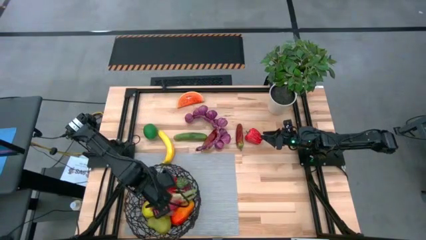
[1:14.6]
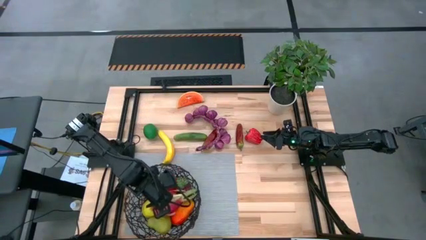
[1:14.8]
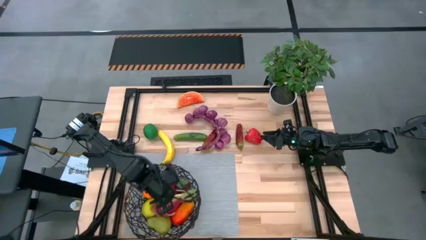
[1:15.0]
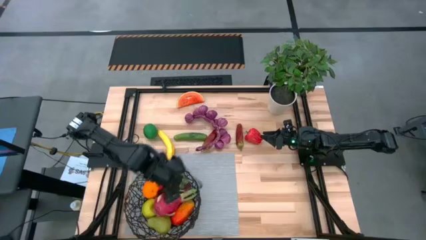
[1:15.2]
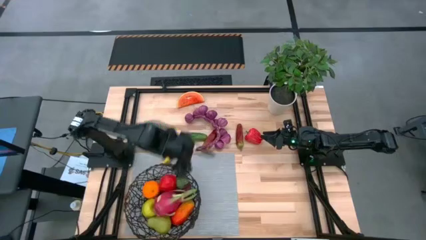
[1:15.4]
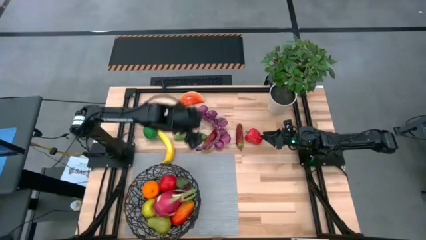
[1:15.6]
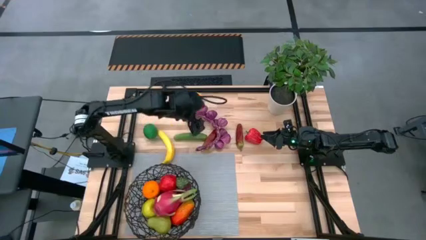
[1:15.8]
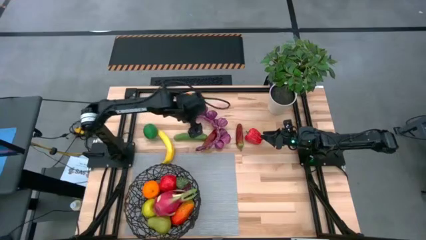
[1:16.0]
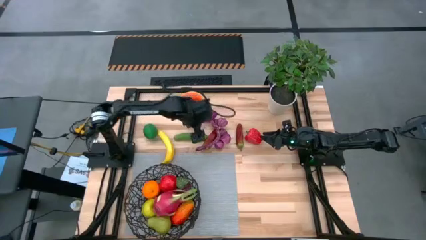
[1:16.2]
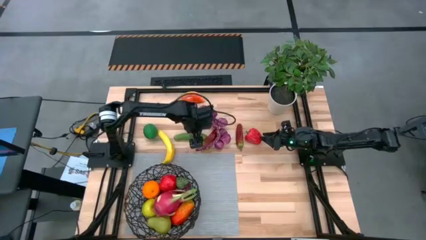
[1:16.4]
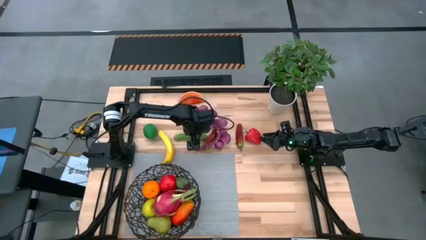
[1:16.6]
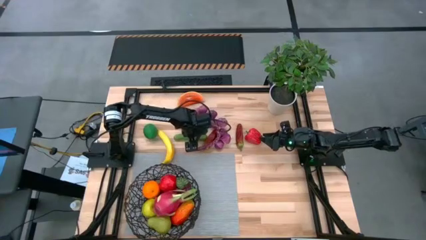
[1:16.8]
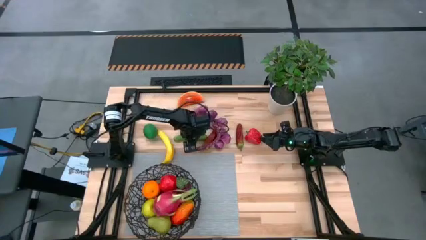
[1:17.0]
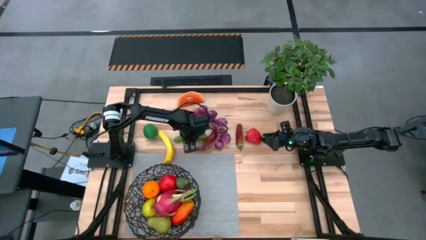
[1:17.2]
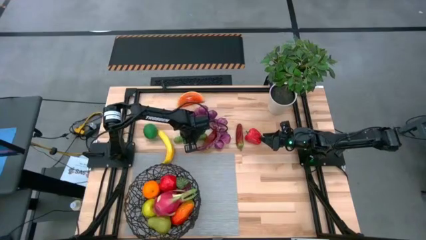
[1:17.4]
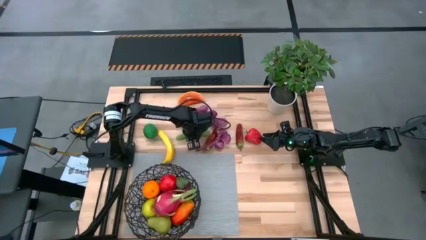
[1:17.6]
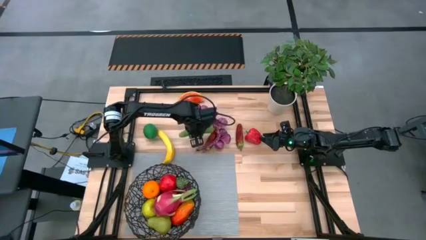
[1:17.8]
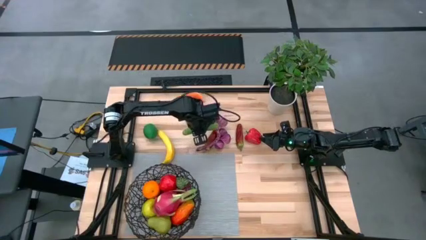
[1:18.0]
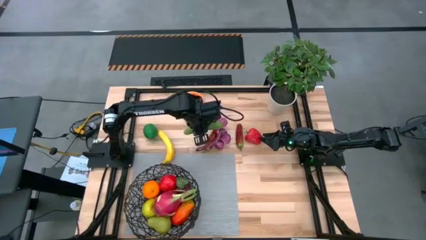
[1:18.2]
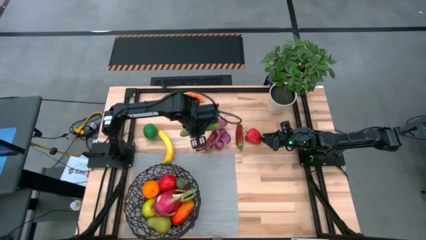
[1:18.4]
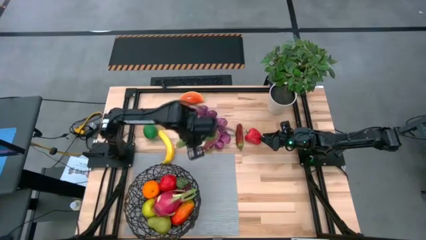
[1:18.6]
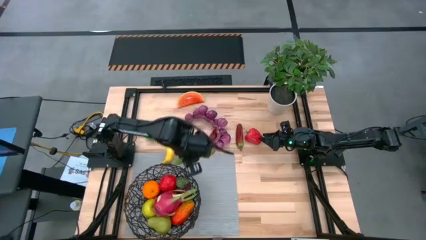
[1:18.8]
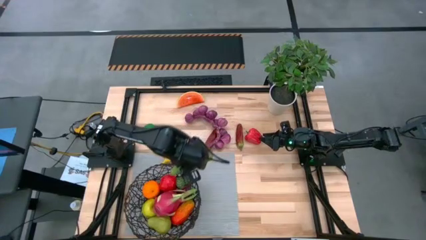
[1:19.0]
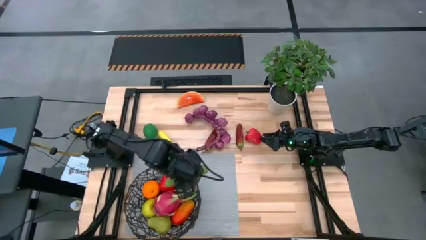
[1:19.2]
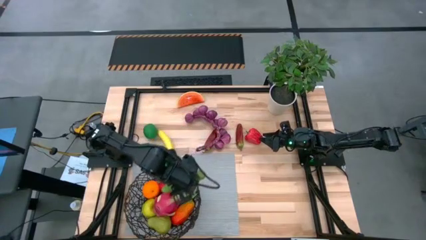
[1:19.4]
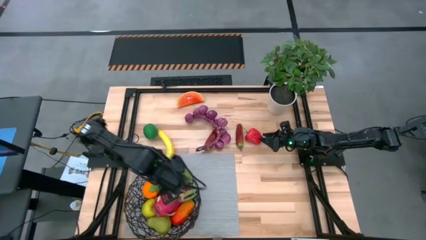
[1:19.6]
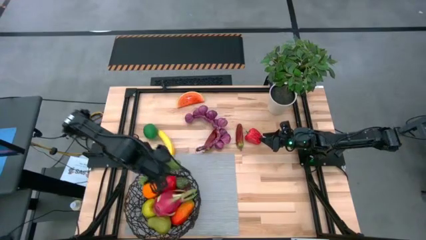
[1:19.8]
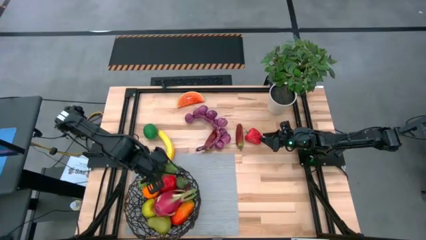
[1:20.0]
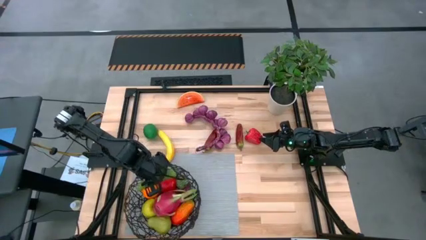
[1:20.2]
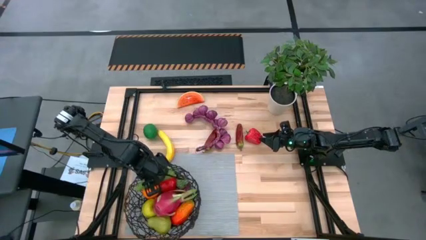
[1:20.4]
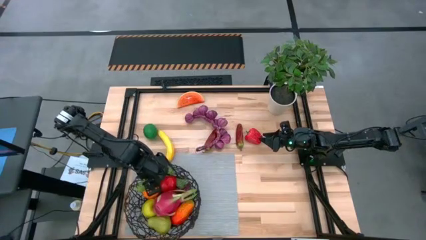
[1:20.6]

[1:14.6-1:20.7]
Task: Build produce basket
Put the cucumber into the black wire basket

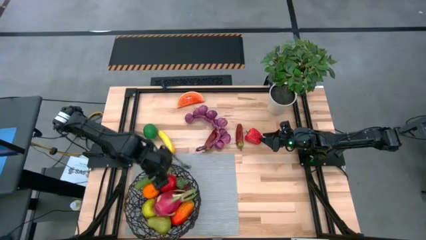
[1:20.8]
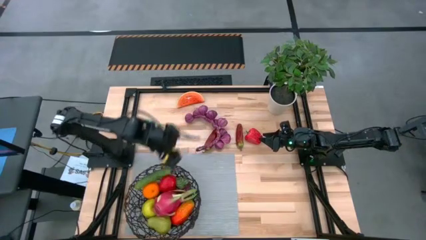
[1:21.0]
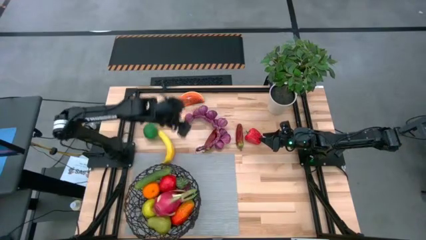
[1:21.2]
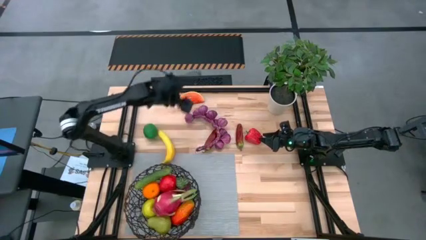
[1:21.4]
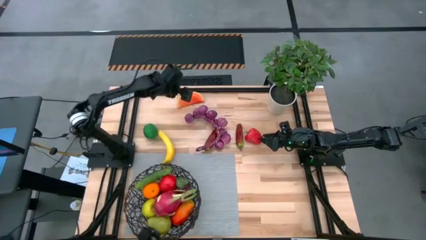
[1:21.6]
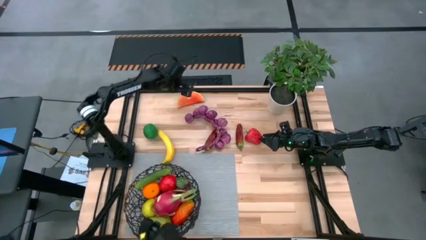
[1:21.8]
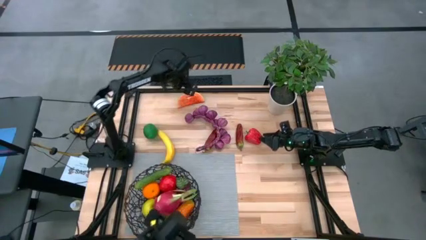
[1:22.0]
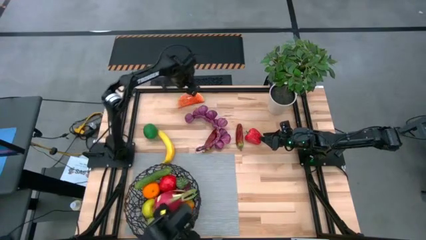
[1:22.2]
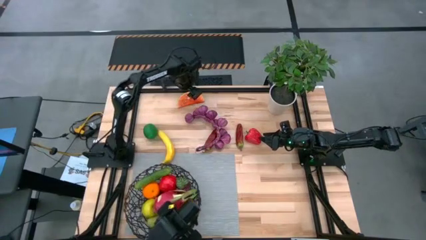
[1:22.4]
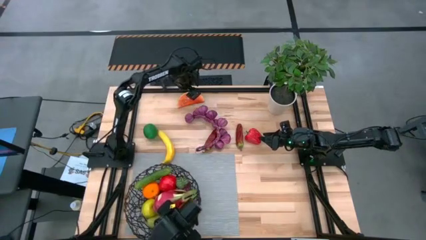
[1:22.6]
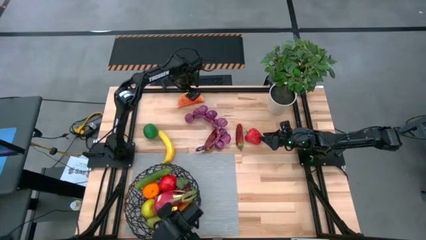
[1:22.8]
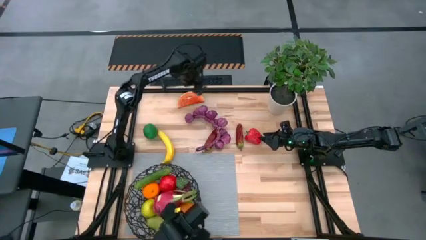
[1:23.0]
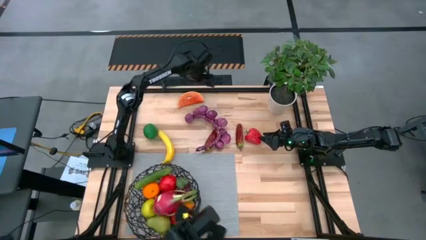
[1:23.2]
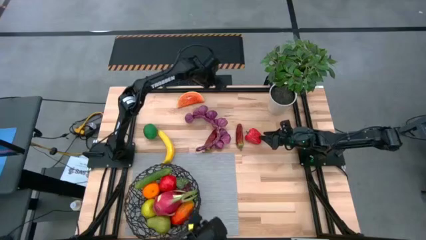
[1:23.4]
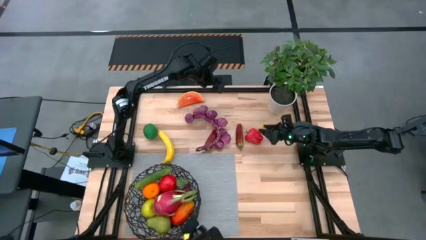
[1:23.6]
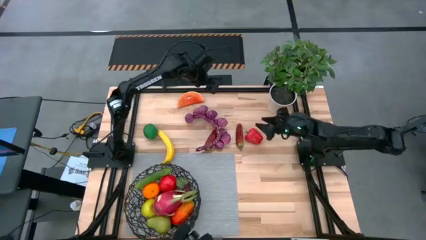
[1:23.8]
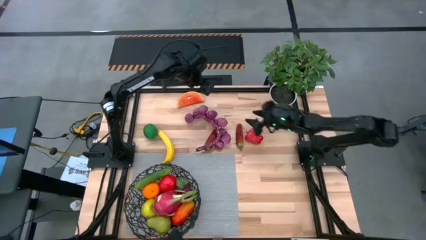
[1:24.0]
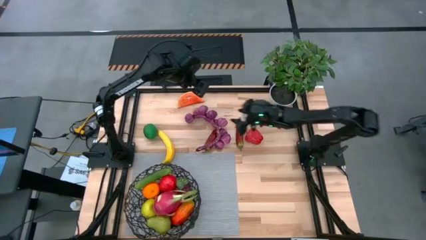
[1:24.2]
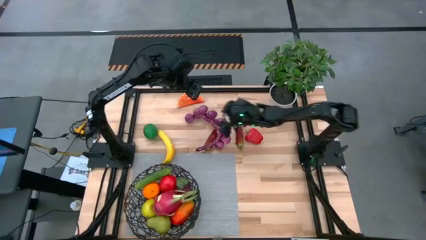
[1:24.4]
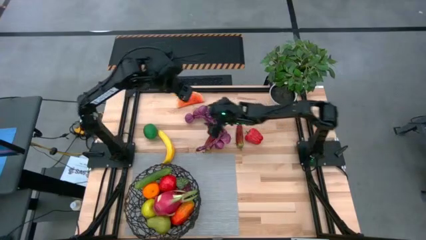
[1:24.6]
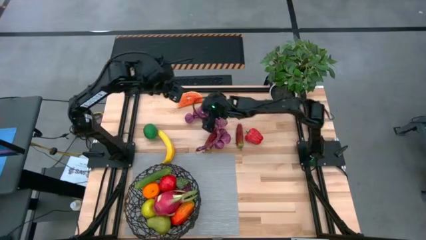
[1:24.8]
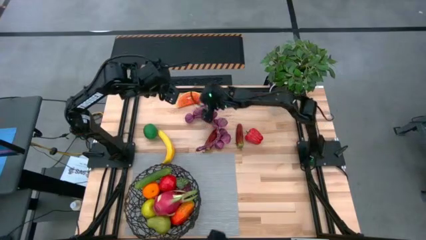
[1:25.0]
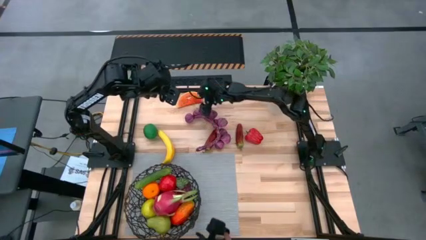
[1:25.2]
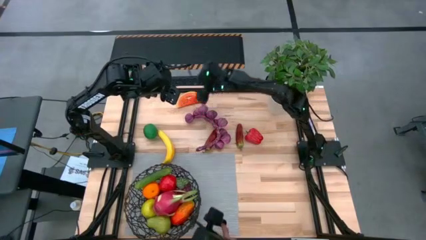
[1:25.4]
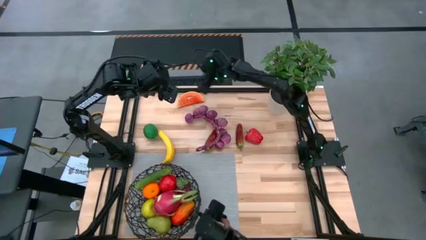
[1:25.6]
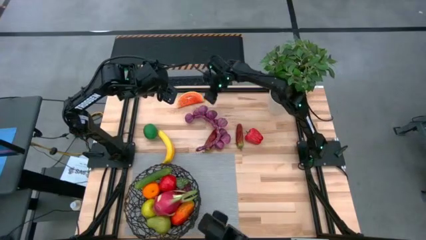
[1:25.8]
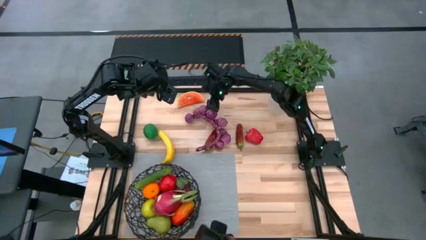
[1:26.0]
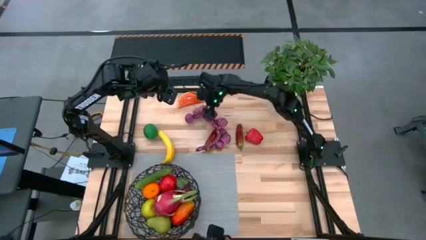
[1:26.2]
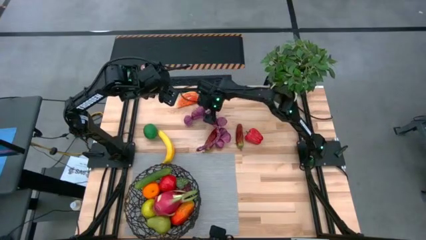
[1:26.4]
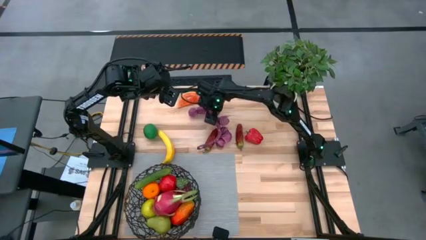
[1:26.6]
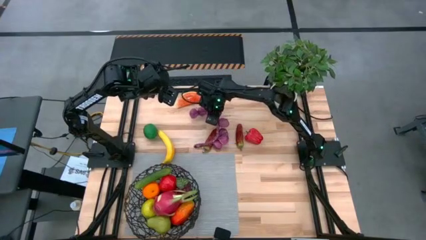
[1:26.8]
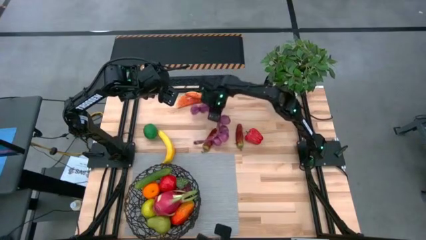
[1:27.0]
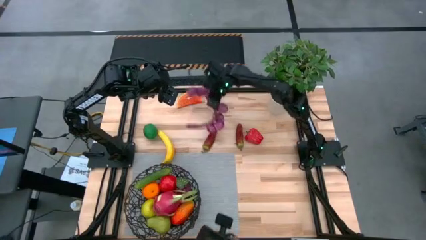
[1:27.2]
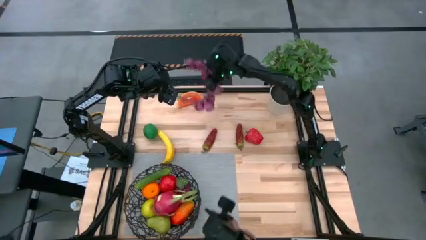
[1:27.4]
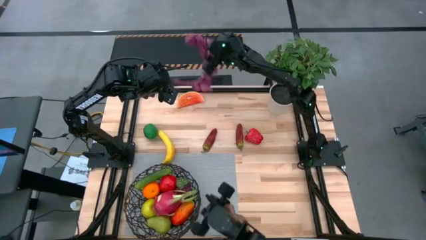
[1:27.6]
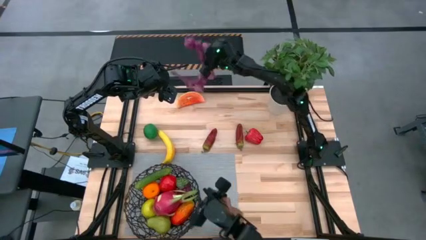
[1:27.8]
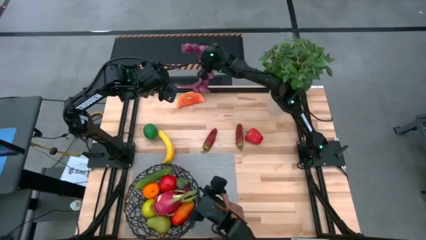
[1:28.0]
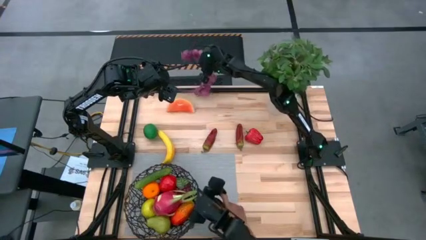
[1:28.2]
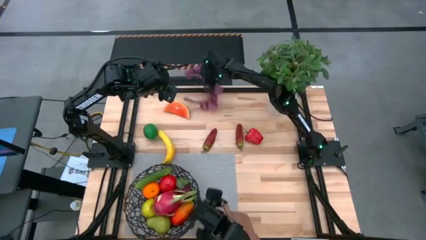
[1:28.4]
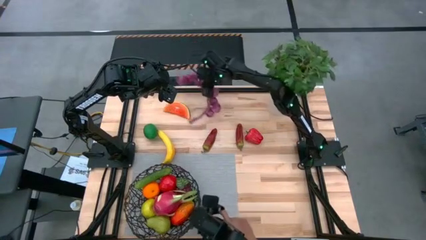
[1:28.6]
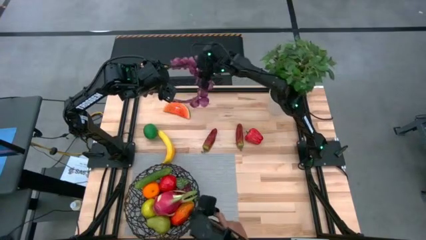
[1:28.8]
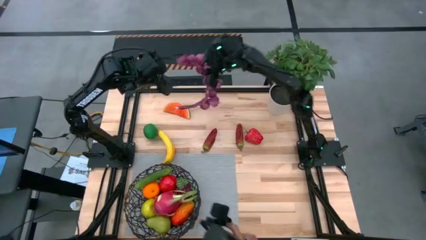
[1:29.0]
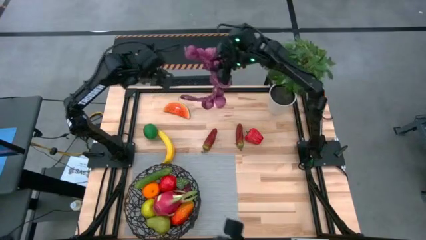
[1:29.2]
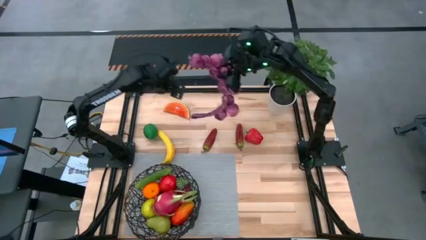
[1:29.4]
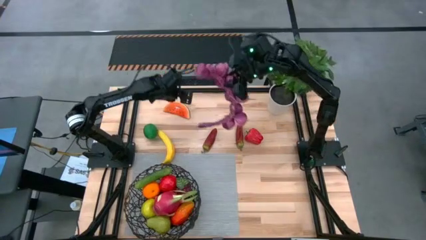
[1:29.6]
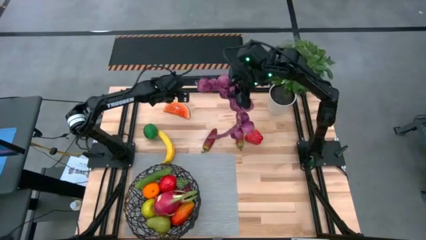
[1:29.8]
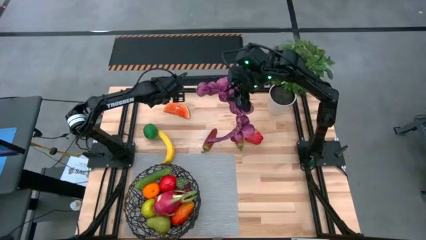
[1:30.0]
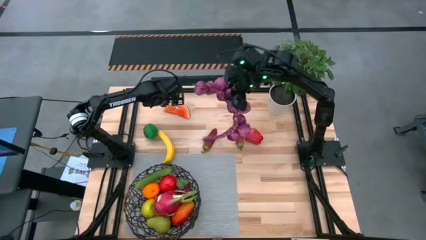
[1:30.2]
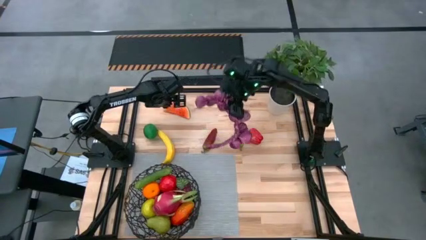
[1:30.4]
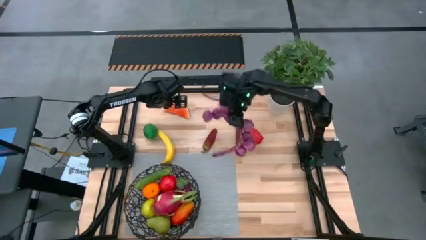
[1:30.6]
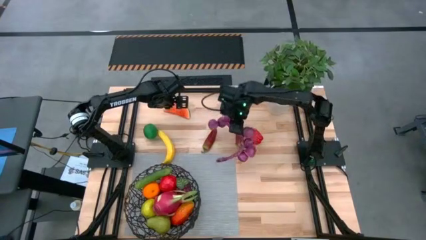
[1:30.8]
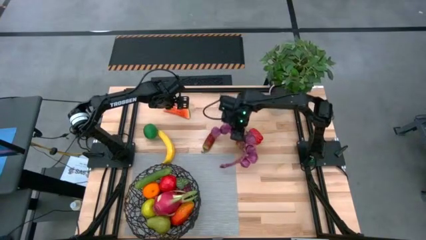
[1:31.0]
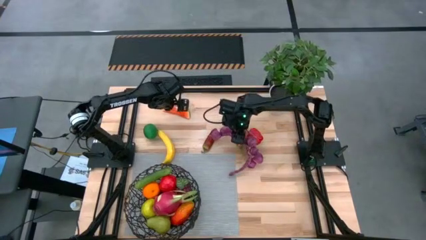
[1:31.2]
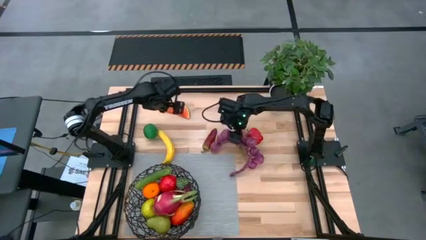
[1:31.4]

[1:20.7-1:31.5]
Move the purple garlic to the center of the table
